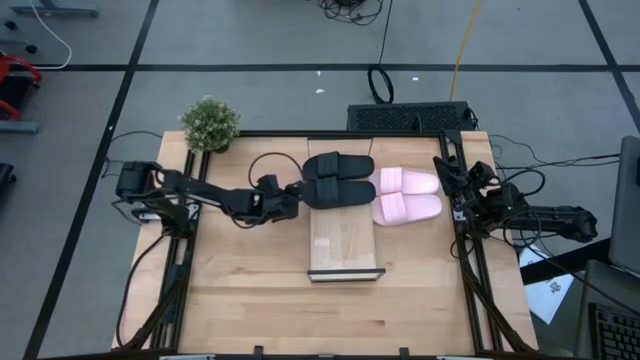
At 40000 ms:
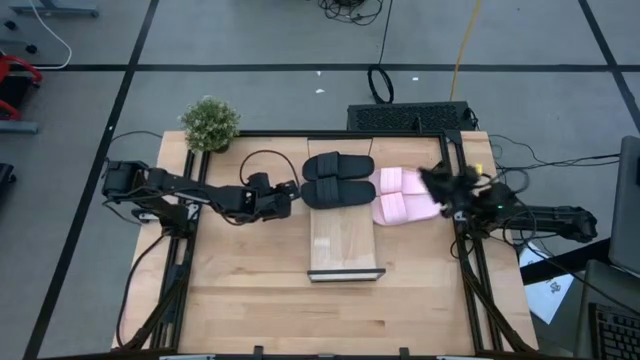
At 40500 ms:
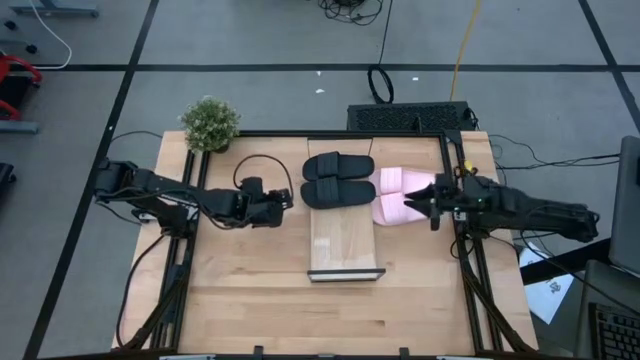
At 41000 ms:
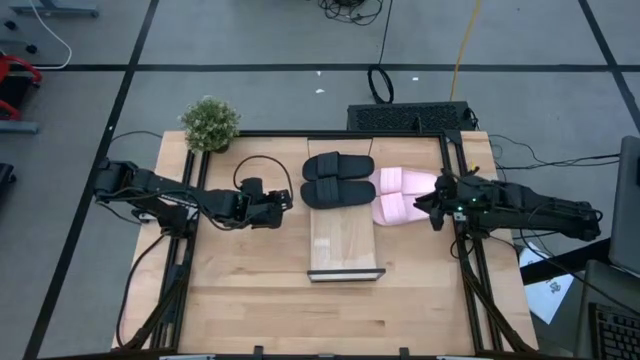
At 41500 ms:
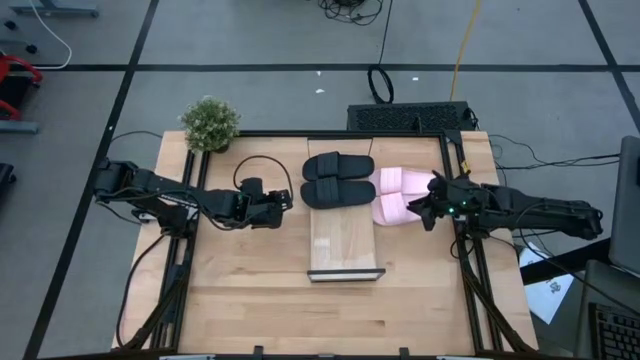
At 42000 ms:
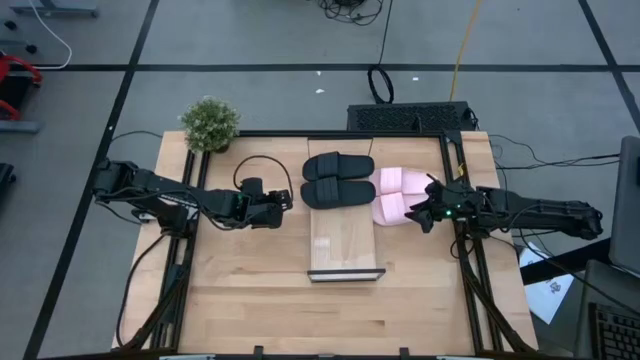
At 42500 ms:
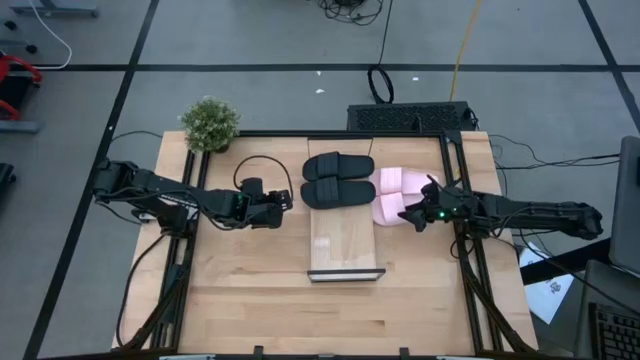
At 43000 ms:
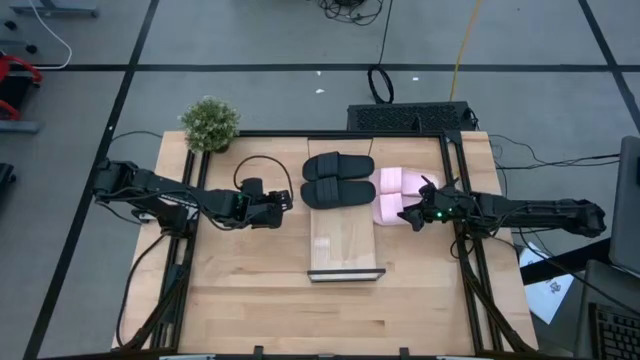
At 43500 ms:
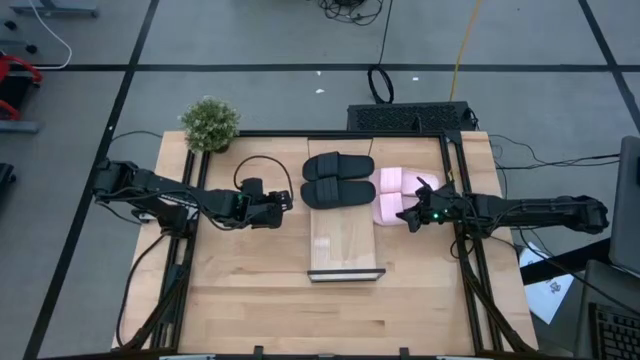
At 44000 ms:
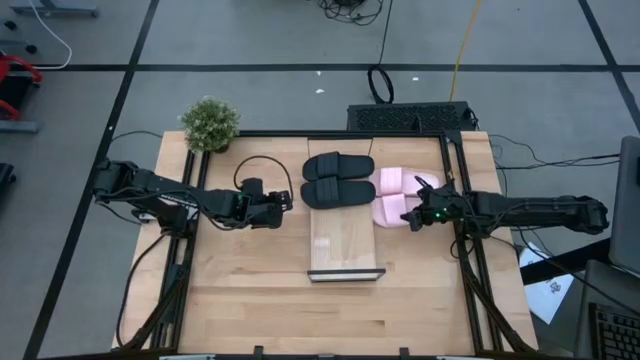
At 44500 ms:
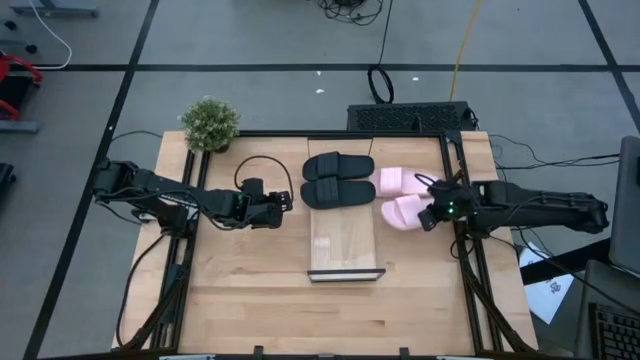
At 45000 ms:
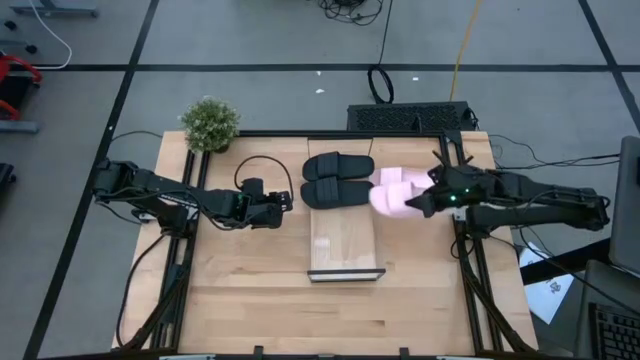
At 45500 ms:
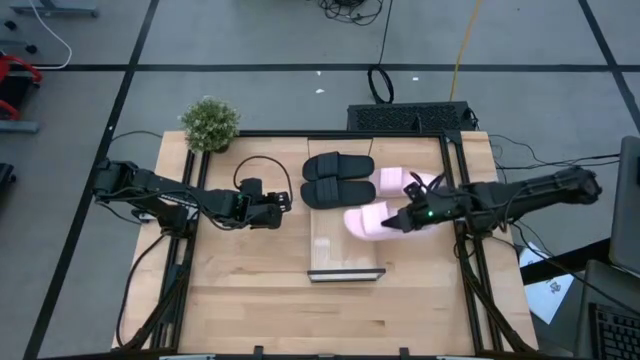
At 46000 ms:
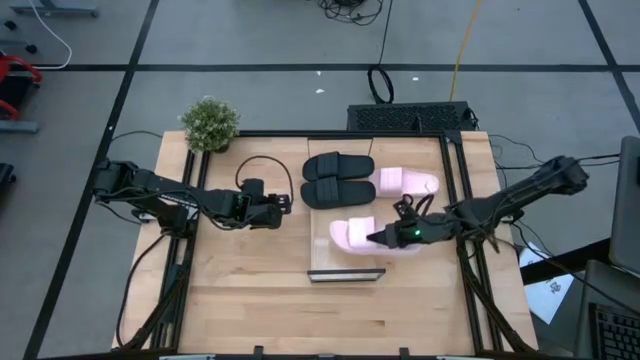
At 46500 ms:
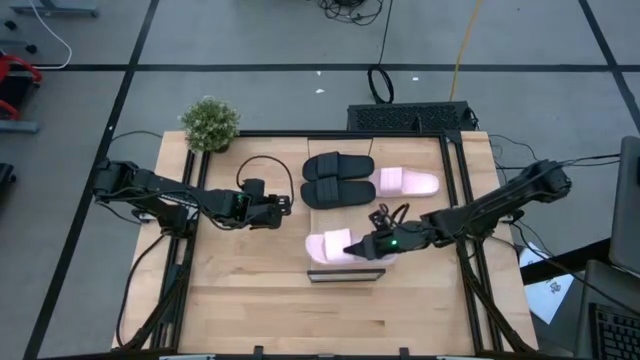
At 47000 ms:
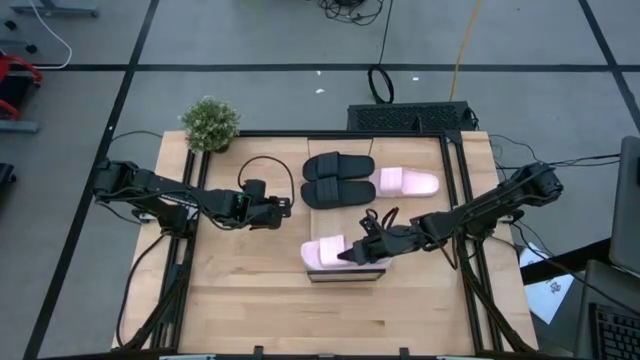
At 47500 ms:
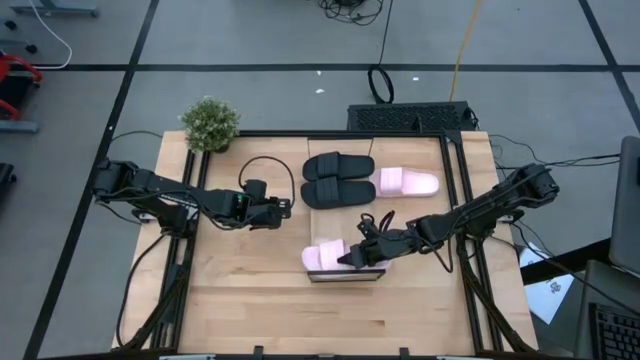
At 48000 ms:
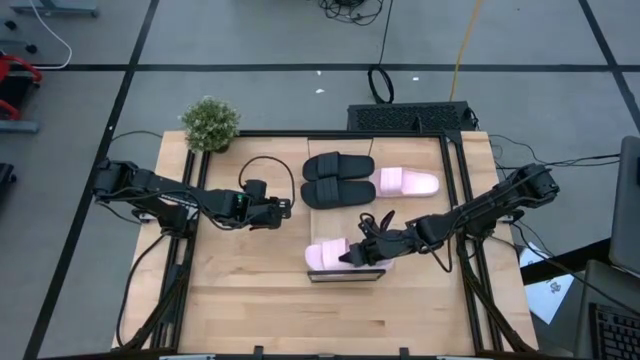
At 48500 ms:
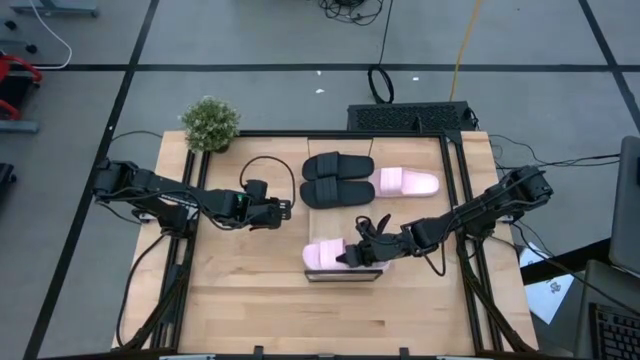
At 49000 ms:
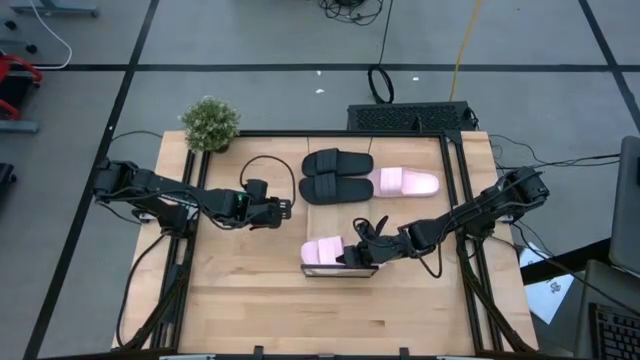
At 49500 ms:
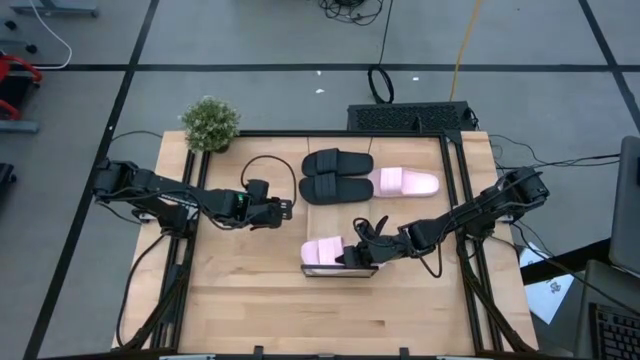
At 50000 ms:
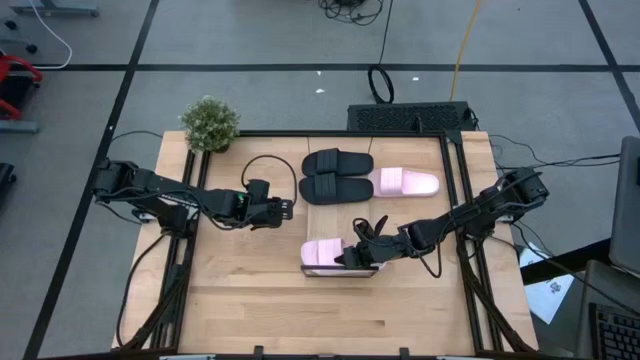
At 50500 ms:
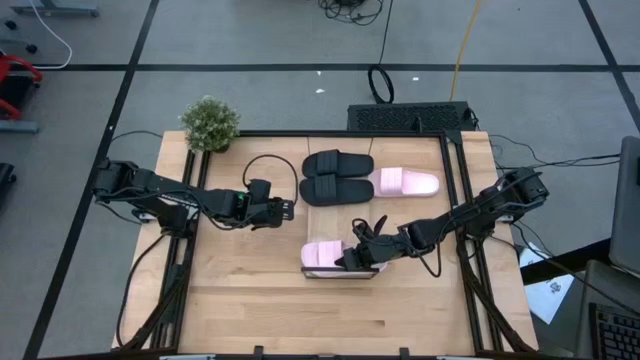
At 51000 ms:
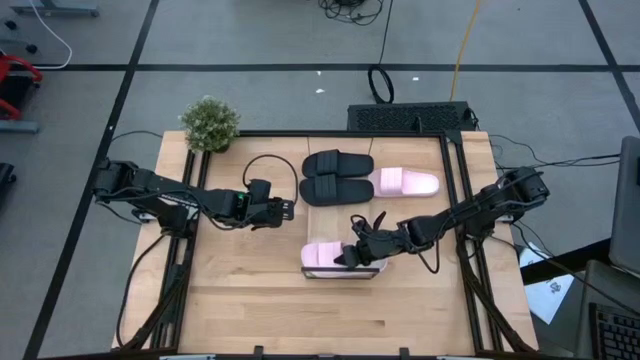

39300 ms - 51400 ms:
Task: Pick and place slides into the shelf
Put the bottom pink slide on the shelf

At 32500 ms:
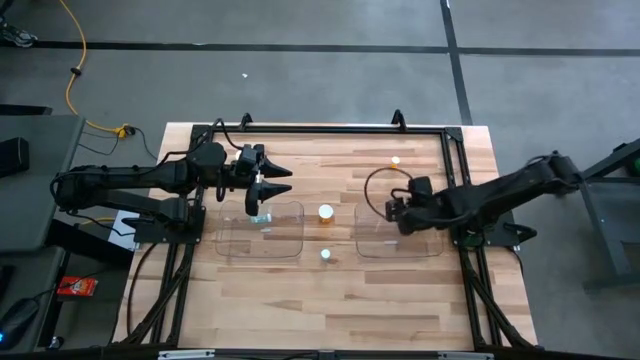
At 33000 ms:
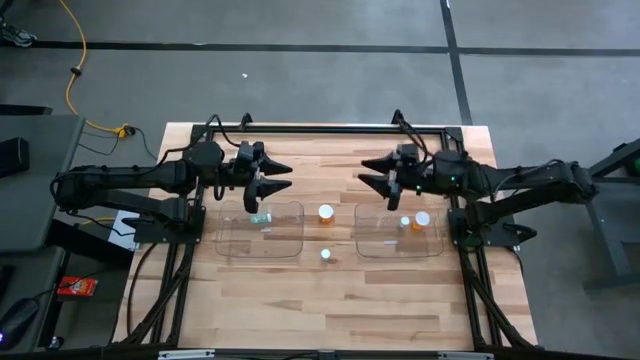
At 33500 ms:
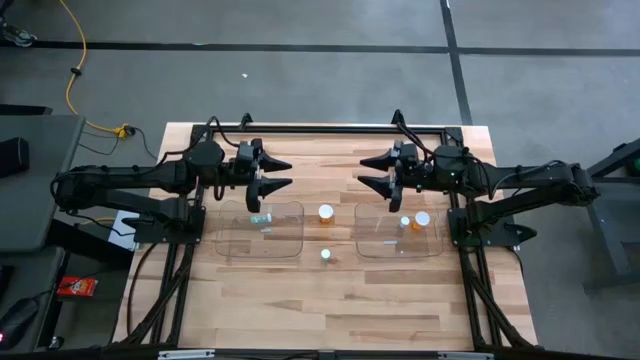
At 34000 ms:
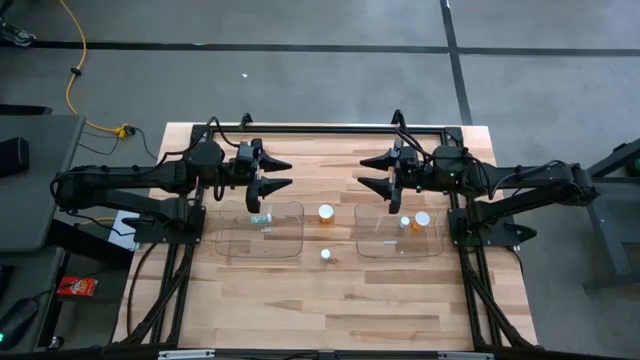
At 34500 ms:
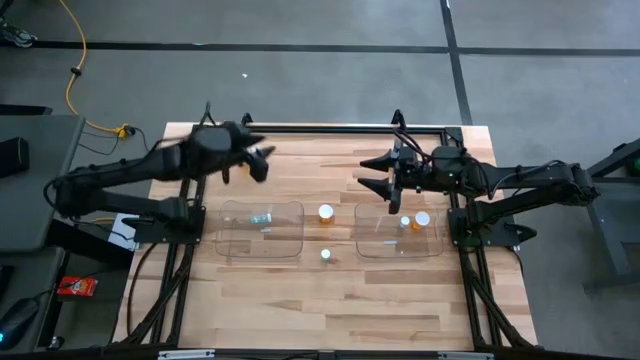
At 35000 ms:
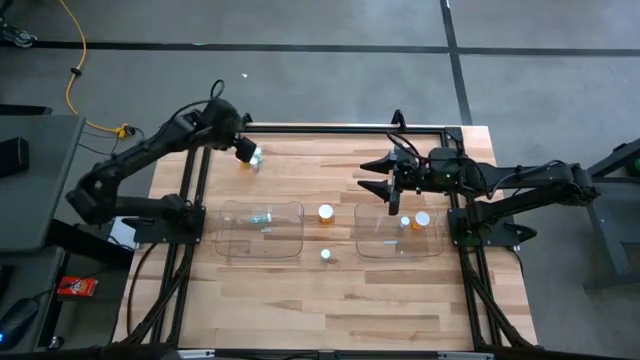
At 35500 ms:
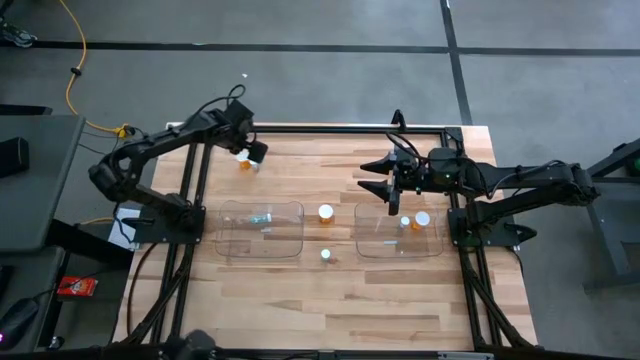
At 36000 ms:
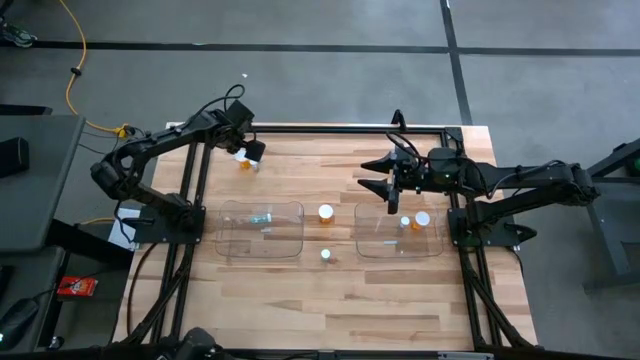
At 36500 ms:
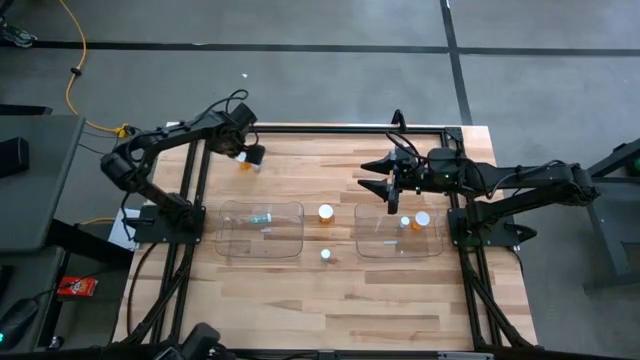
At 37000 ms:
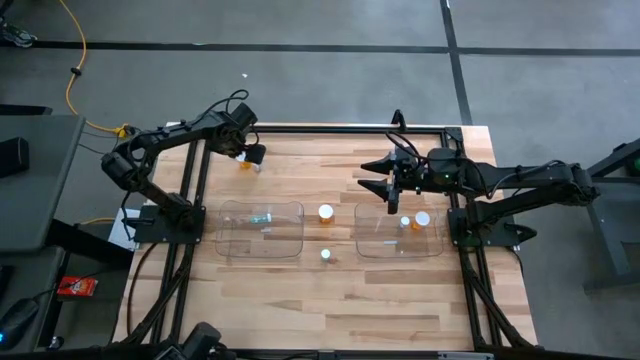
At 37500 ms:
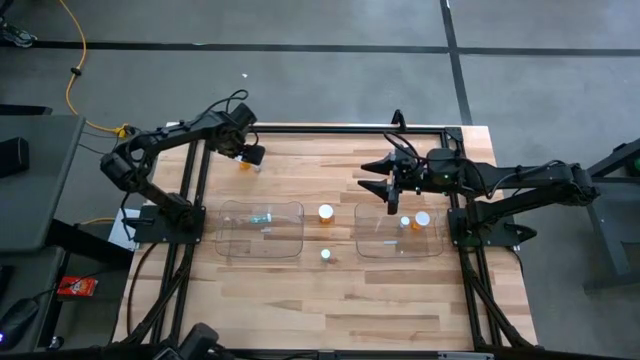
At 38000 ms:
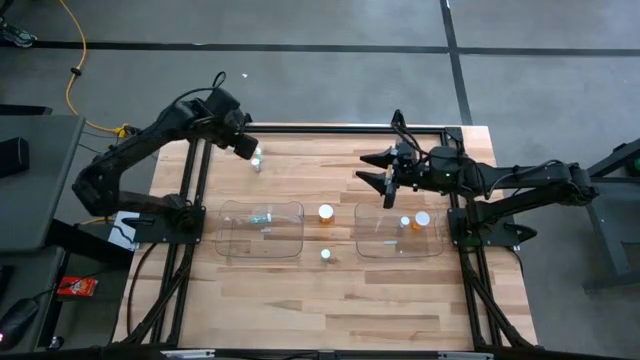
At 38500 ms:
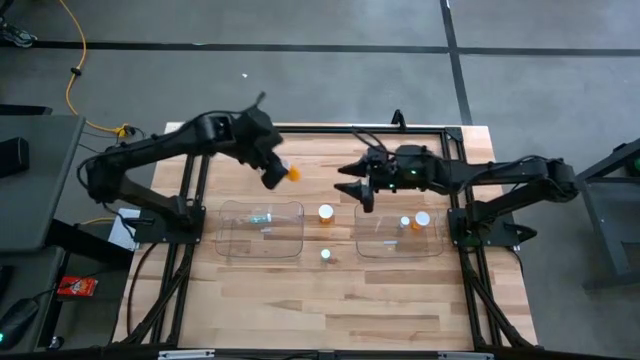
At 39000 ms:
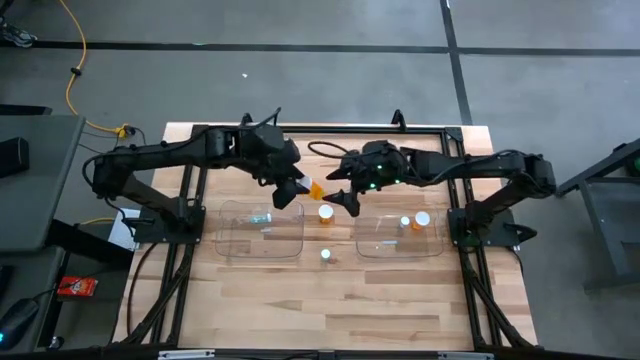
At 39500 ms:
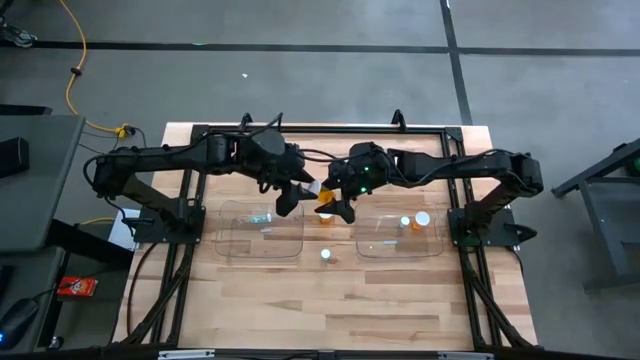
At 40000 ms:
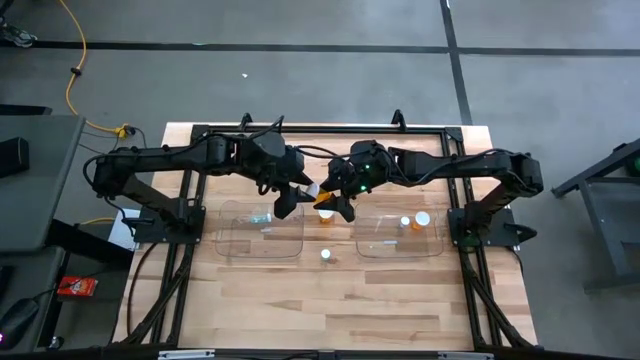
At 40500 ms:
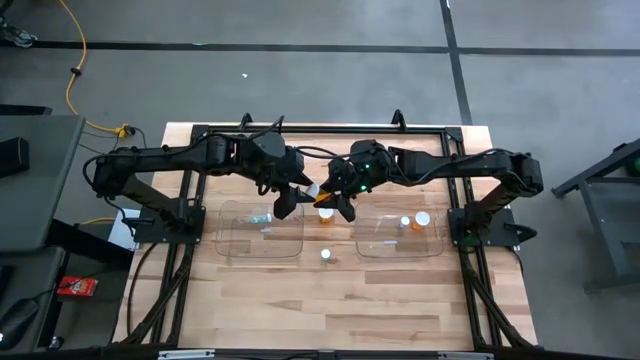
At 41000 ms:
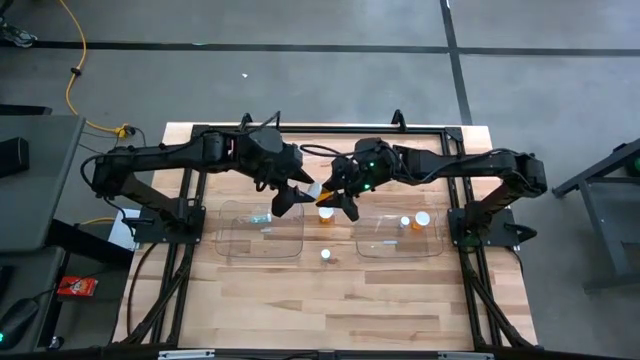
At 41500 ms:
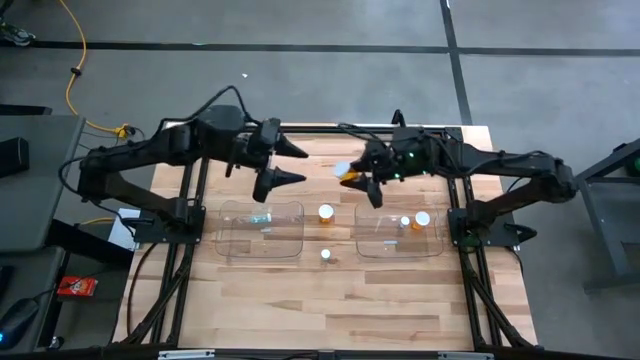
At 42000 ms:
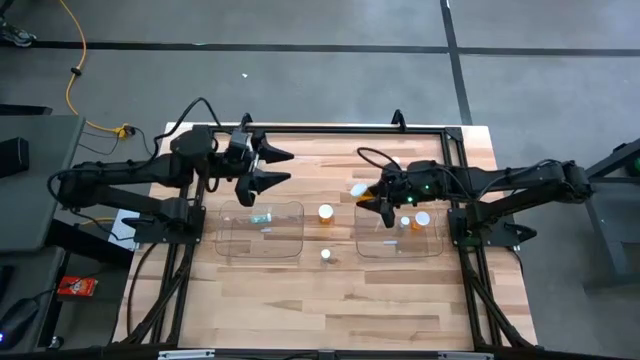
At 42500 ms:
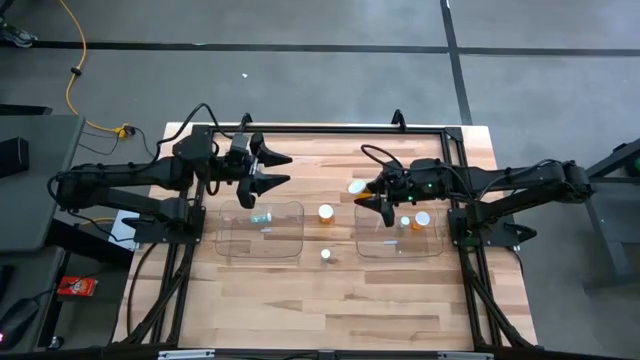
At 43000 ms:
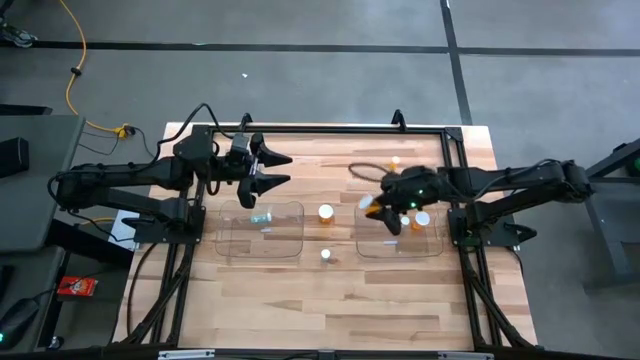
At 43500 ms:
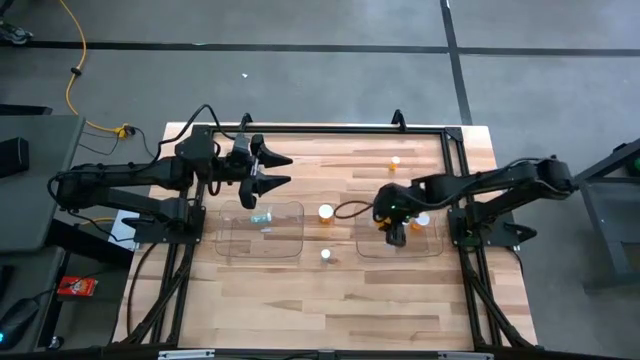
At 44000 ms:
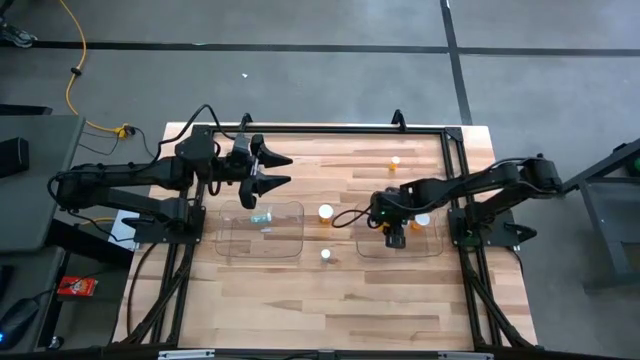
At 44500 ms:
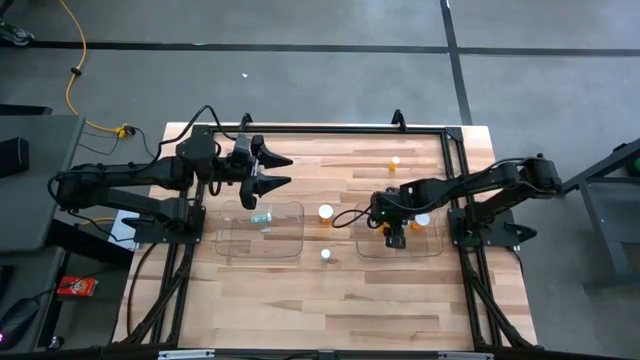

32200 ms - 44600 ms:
Task: Pick and place medicine bottles into bin by pill shape (circle, oval)
Put the top orange capsule bottle into the right transparent bin
